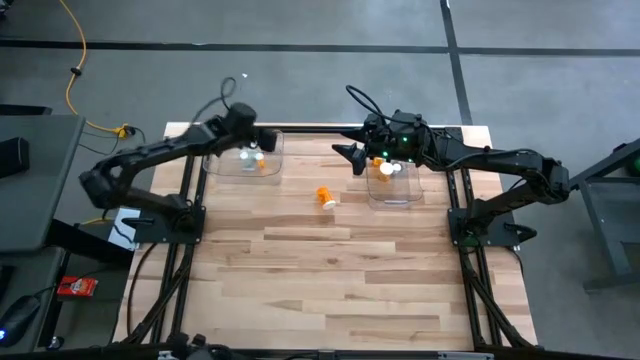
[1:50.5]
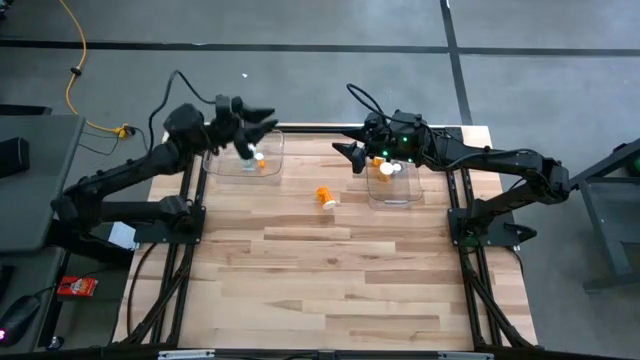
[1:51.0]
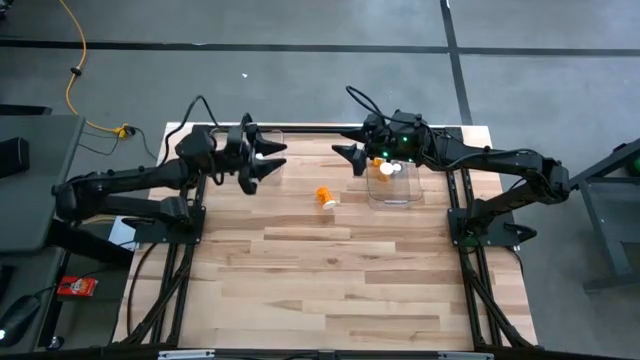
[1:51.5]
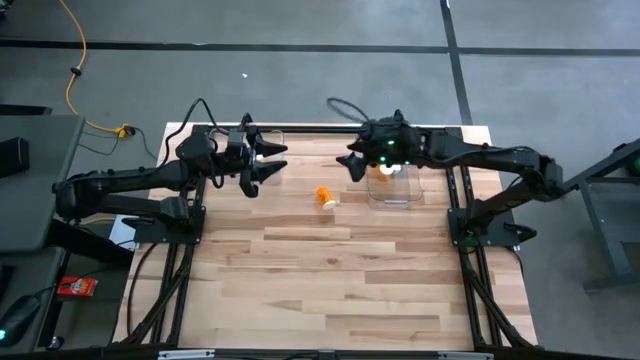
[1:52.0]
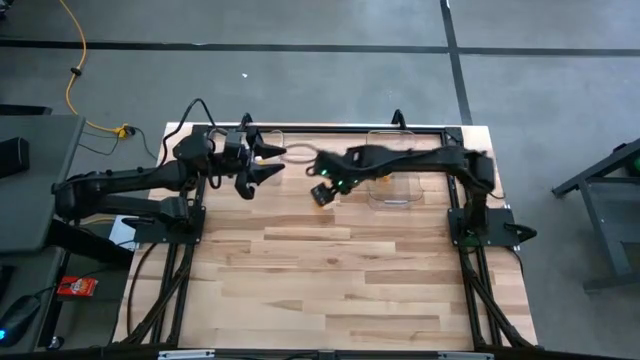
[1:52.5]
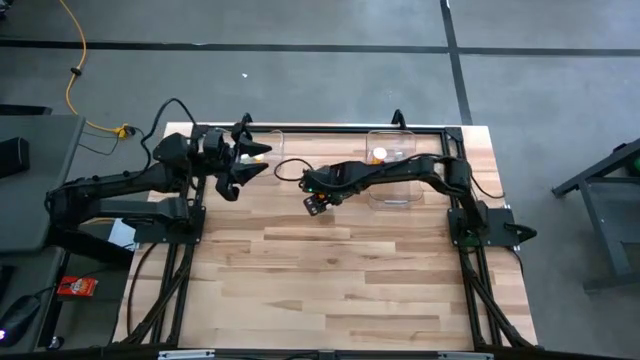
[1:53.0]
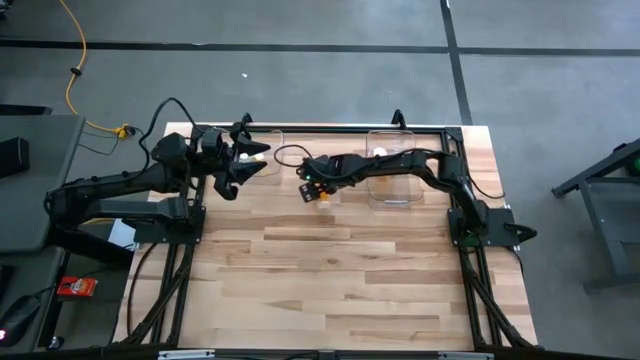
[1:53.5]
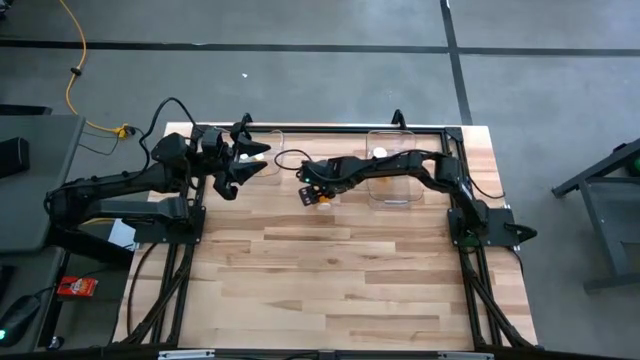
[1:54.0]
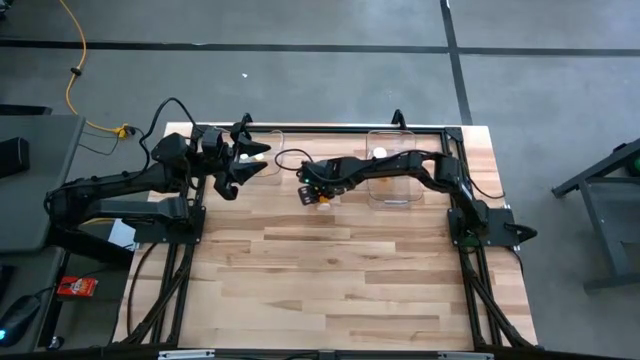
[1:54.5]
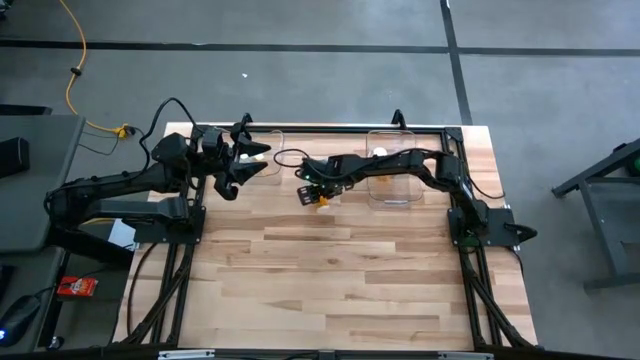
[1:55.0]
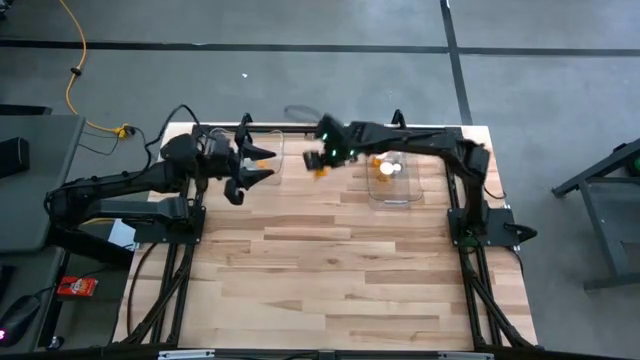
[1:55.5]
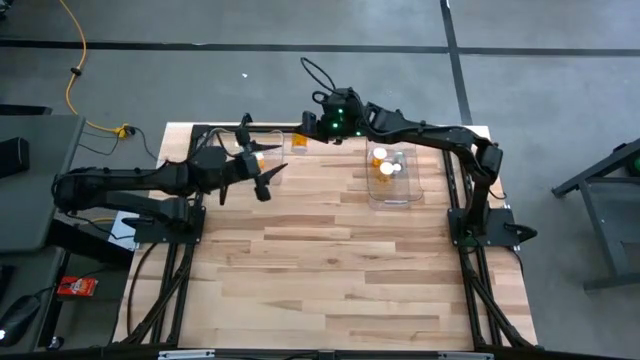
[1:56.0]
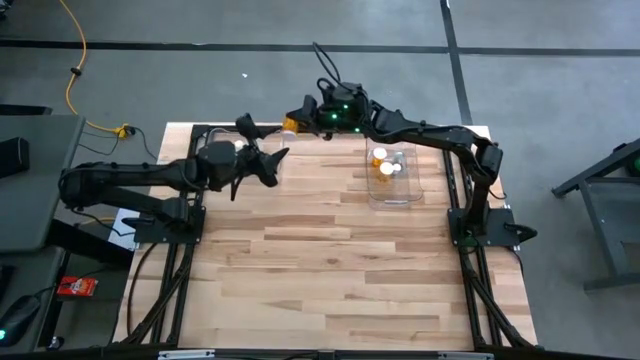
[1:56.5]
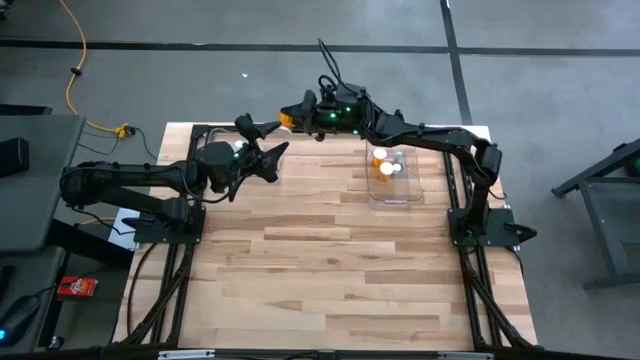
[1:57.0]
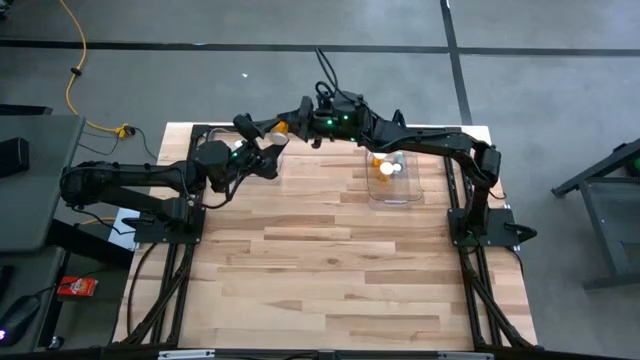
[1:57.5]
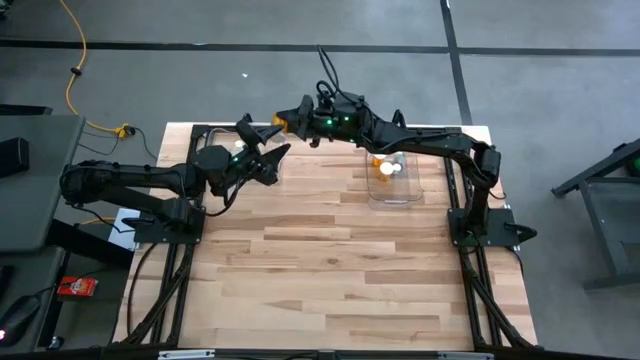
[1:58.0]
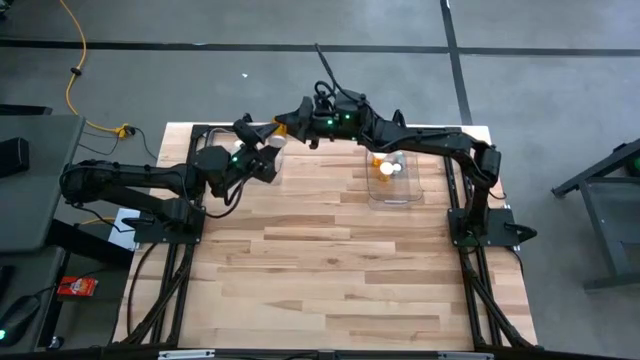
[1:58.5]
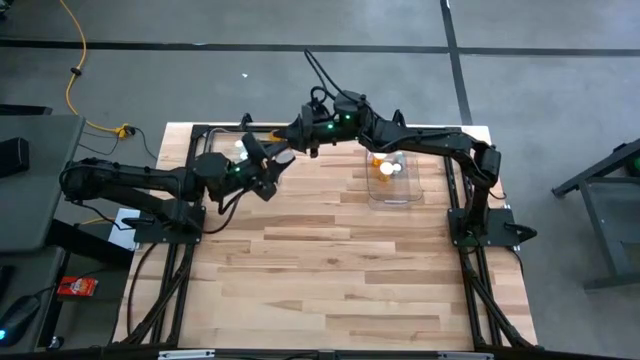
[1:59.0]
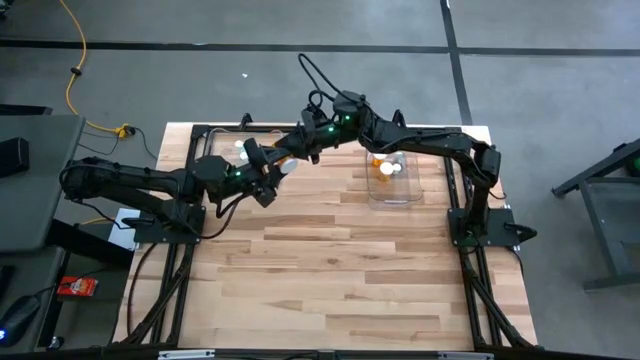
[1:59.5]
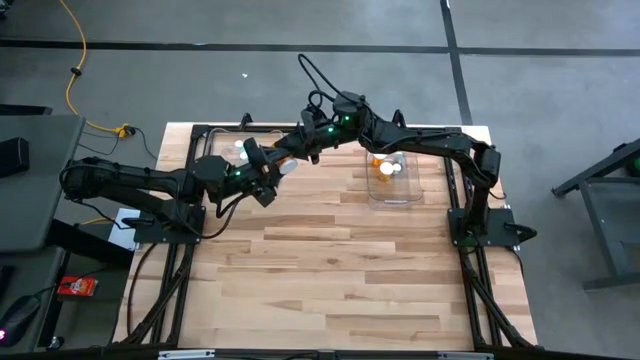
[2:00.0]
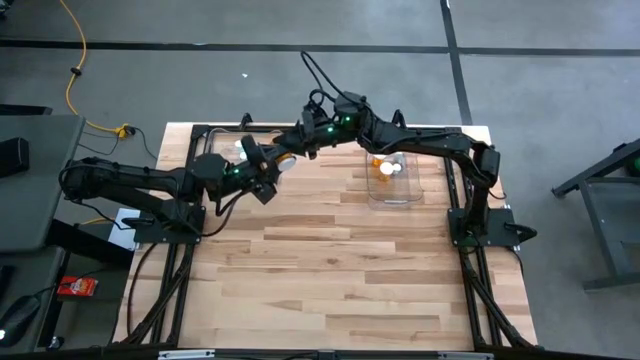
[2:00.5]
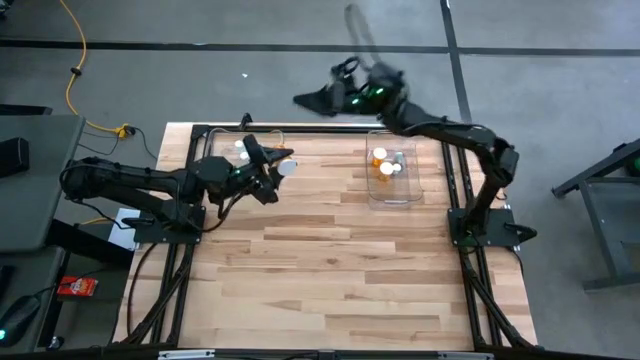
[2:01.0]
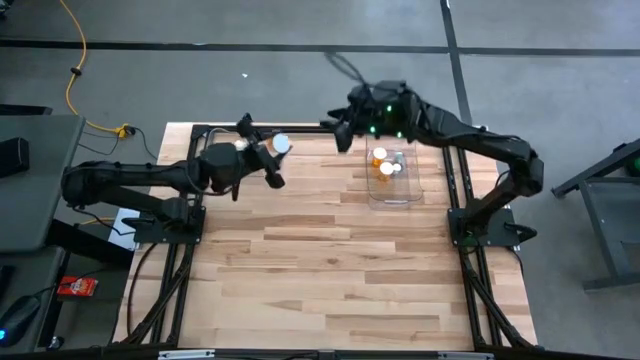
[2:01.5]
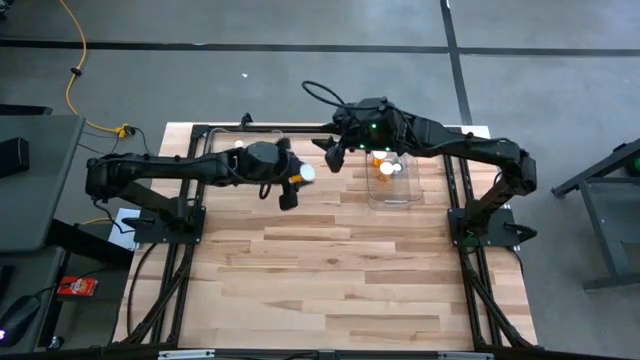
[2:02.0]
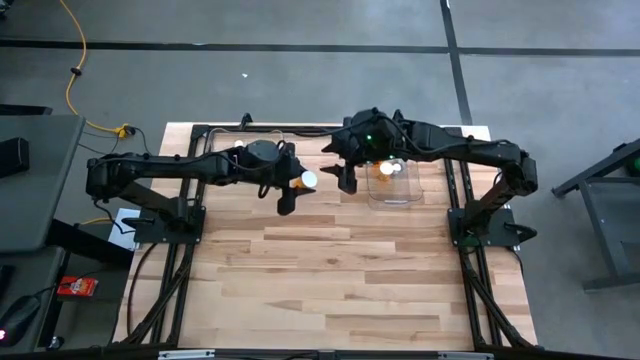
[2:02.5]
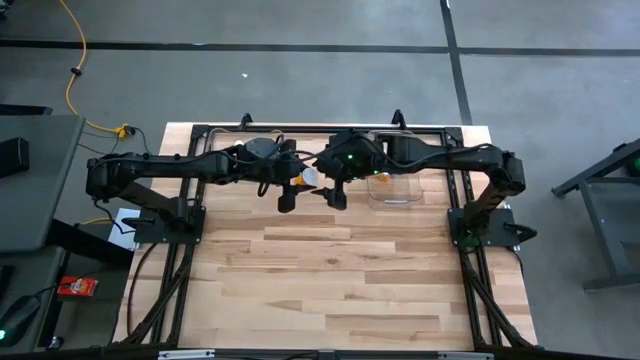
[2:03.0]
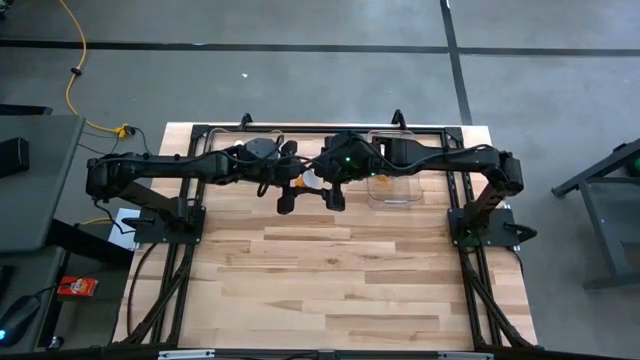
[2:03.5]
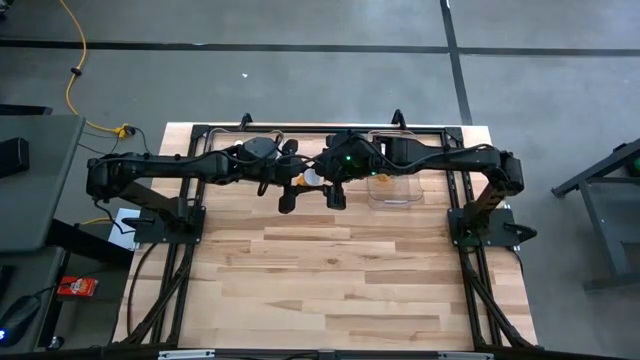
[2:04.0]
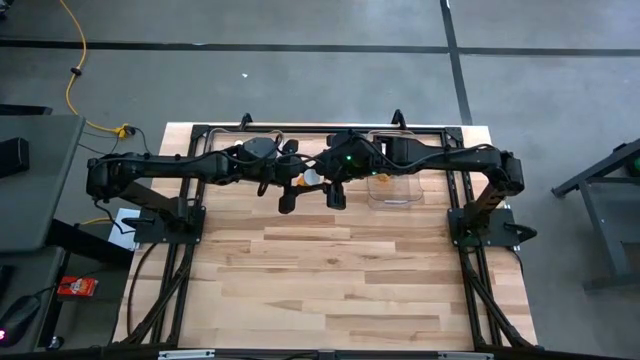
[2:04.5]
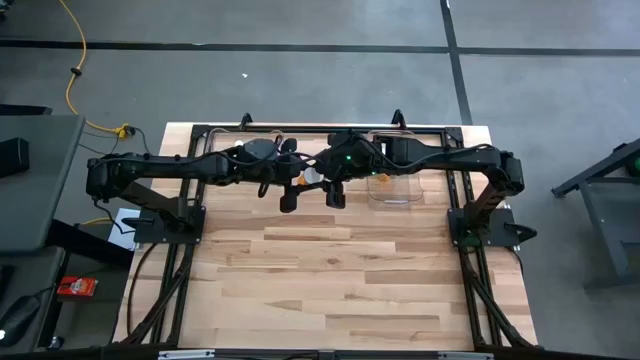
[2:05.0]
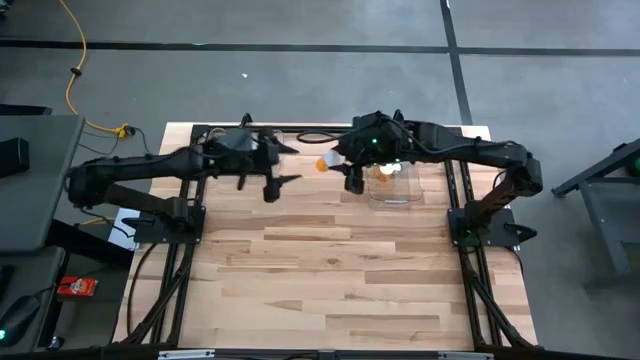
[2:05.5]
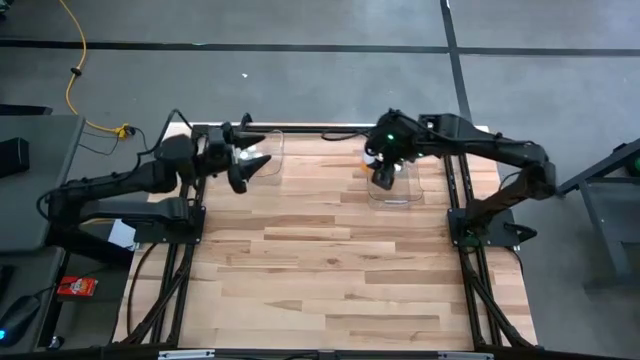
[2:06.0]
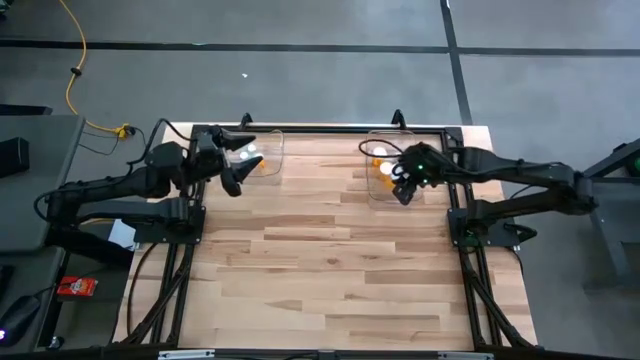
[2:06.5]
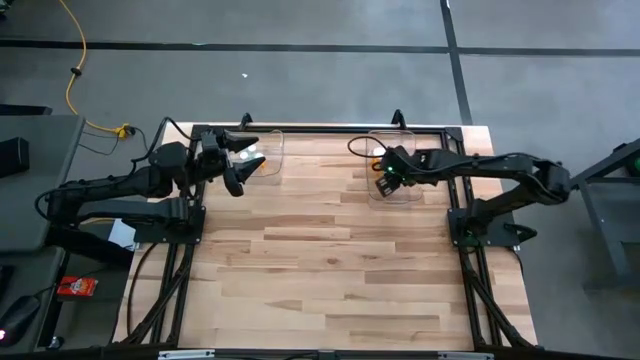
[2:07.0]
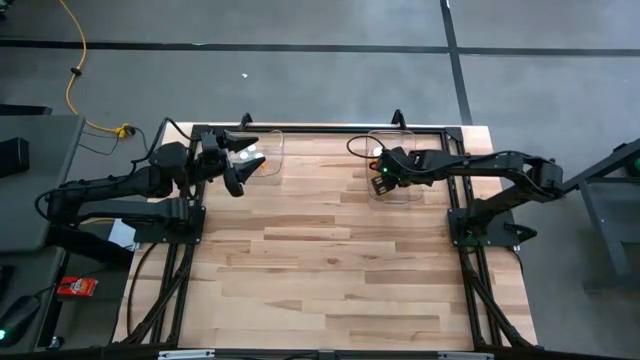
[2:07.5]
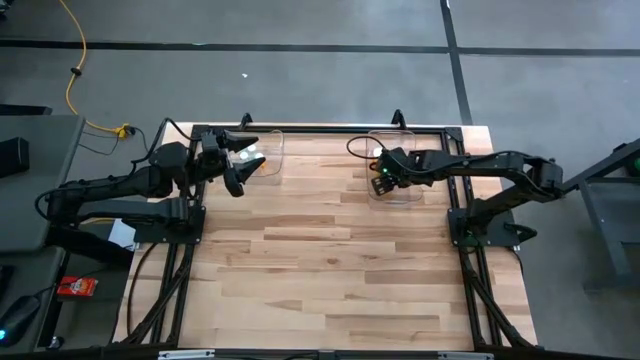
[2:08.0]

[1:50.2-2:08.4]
Task: Pick and place medicine bottles into bin by pill shape (circle, oval)
Put the orange capsule bottle into the right transparent bin

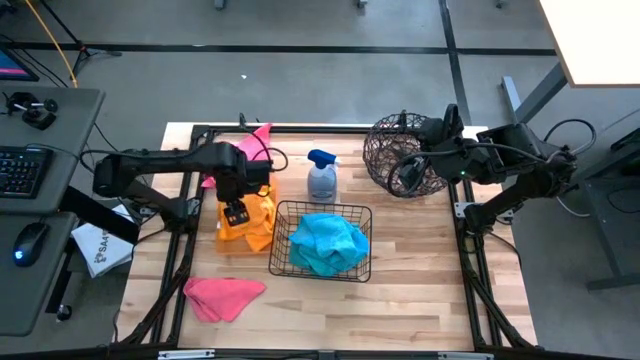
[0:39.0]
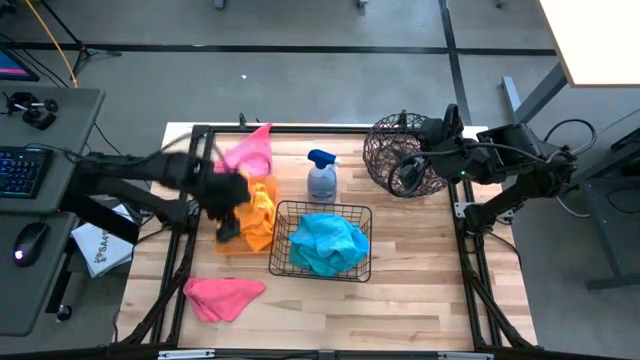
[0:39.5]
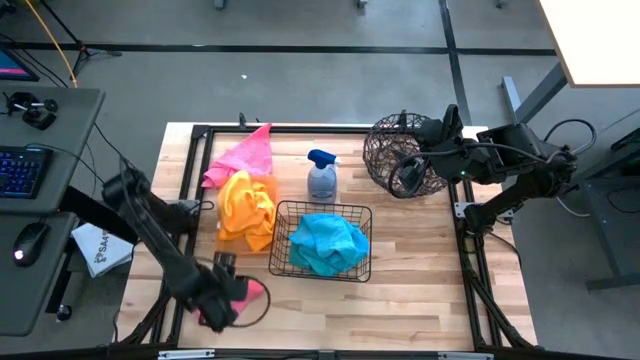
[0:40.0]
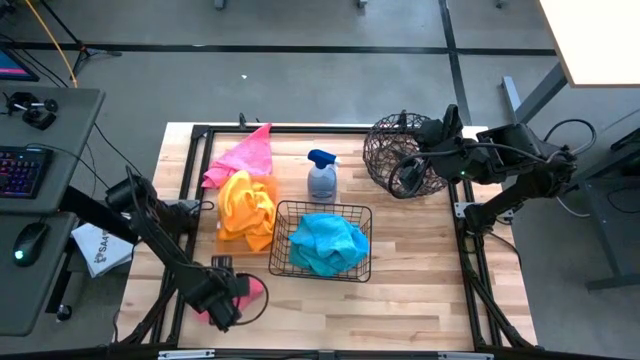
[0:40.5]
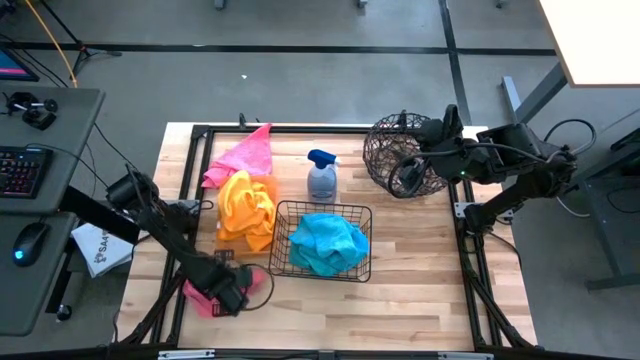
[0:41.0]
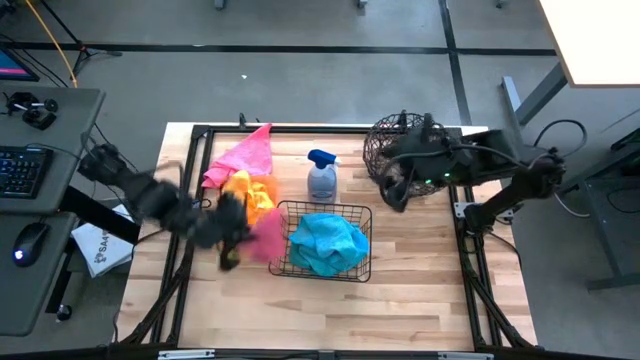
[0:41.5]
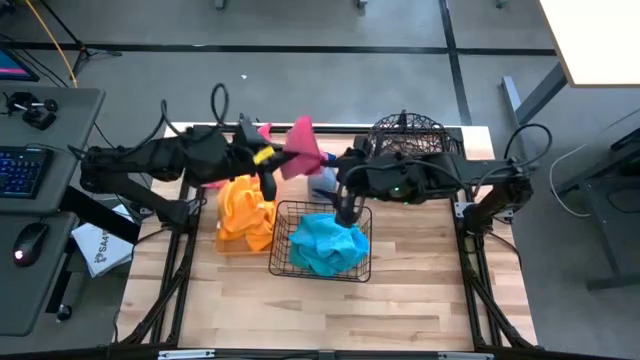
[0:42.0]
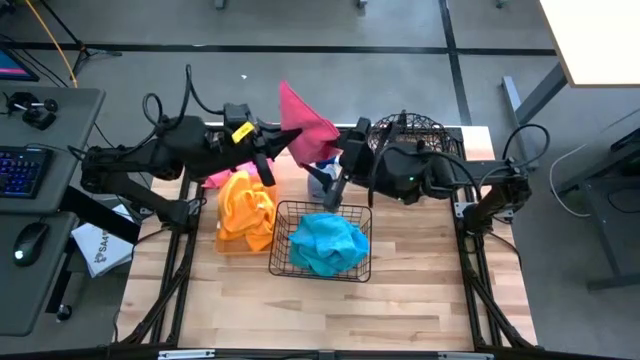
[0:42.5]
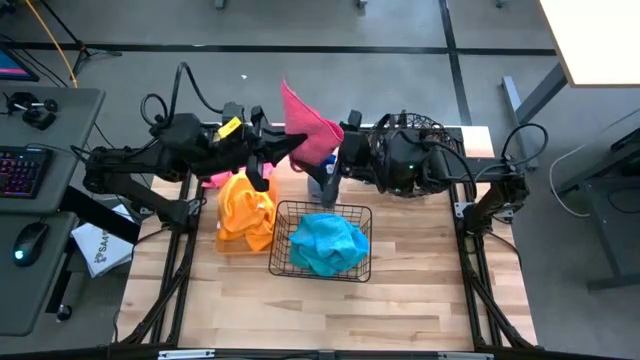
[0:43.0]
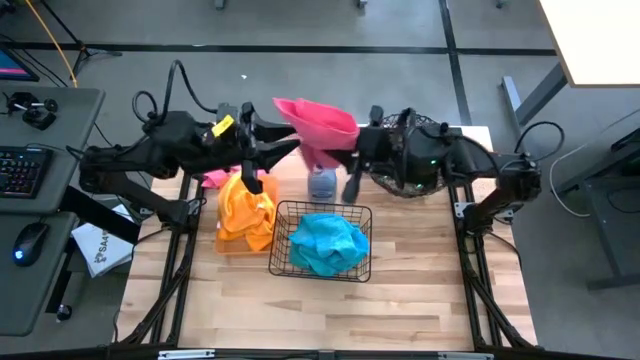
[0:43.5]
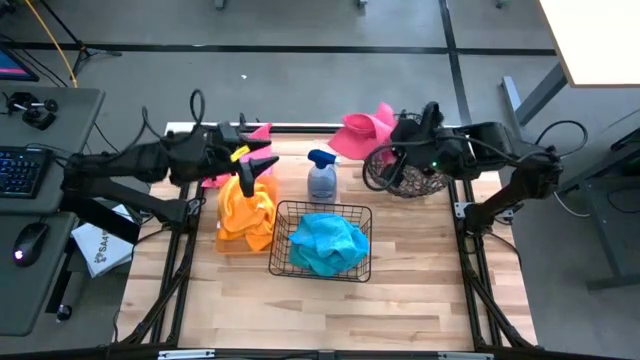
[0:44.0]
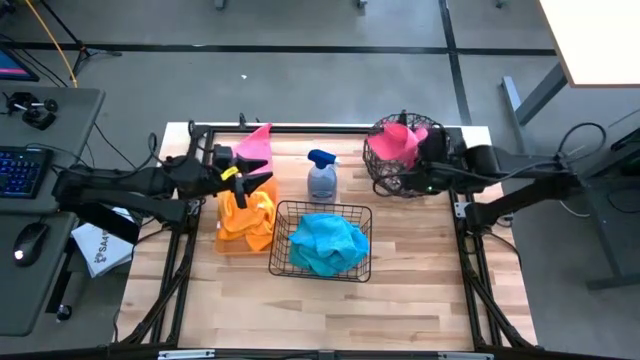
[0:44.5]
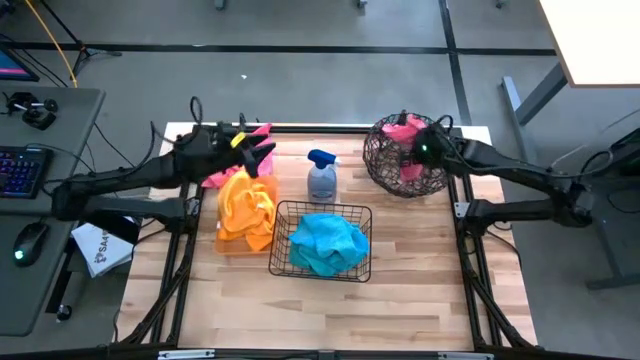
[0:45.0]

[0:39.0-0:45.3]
Task: Sort microfiber towel by color & place in baskets
Put the bottom pink towel into the top wire basket
